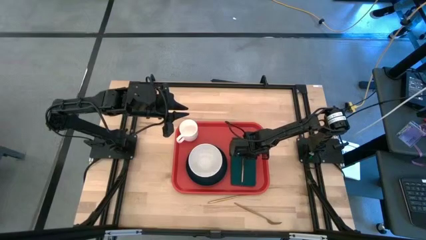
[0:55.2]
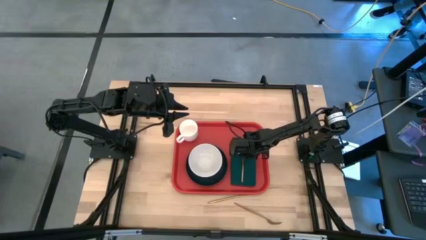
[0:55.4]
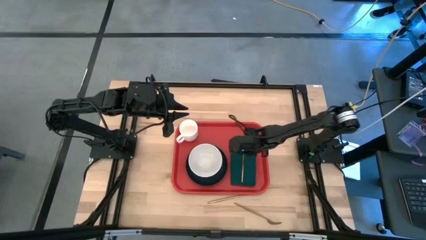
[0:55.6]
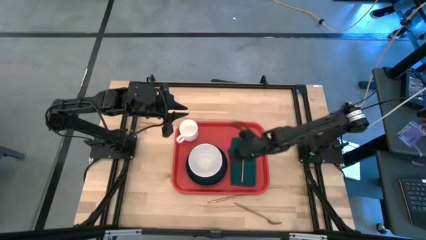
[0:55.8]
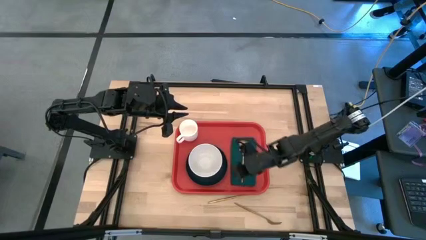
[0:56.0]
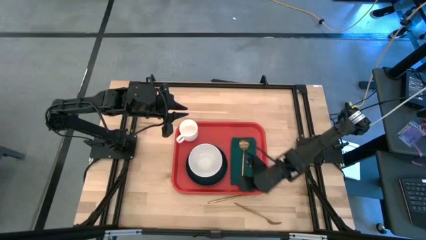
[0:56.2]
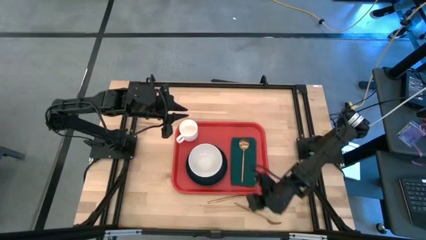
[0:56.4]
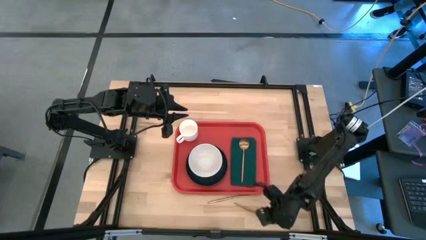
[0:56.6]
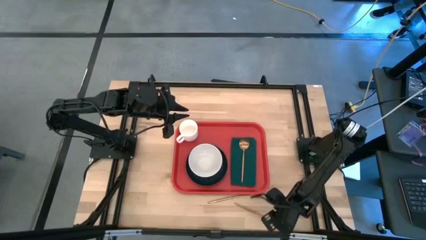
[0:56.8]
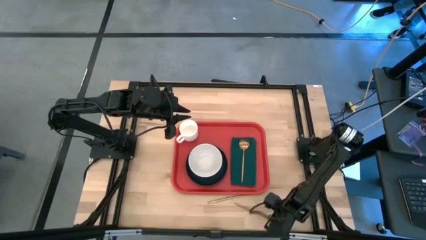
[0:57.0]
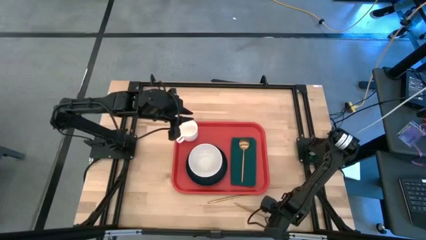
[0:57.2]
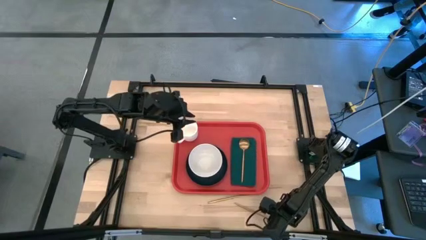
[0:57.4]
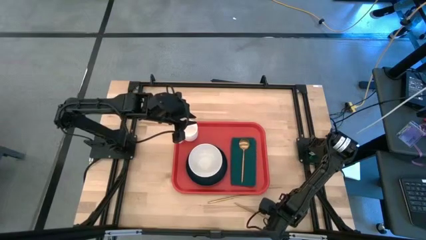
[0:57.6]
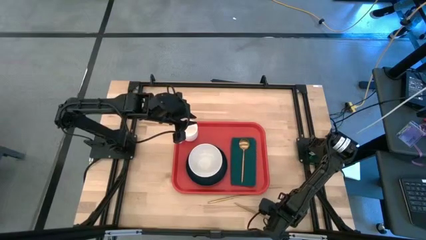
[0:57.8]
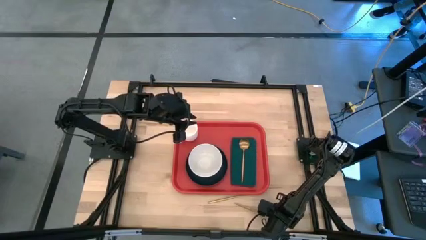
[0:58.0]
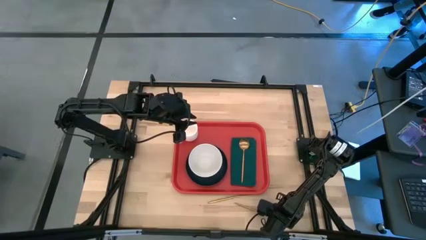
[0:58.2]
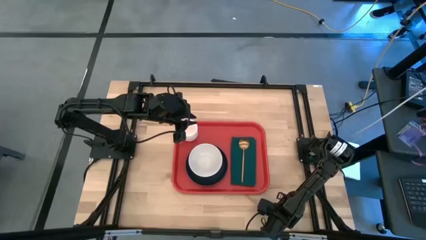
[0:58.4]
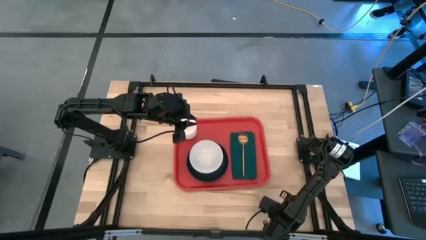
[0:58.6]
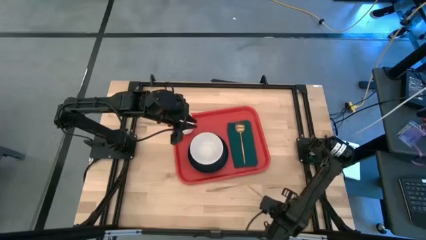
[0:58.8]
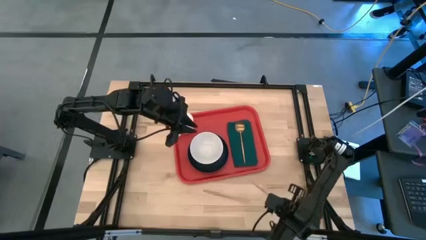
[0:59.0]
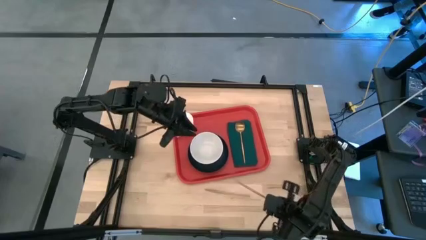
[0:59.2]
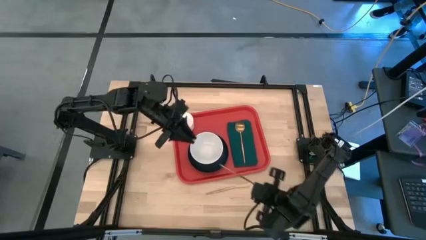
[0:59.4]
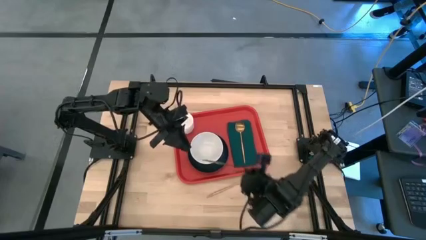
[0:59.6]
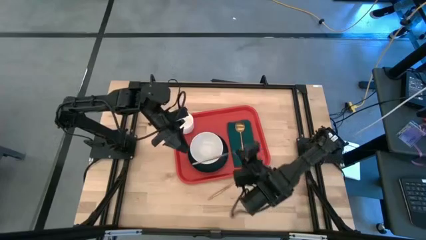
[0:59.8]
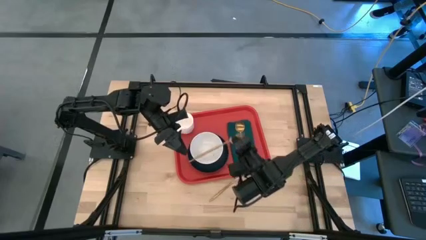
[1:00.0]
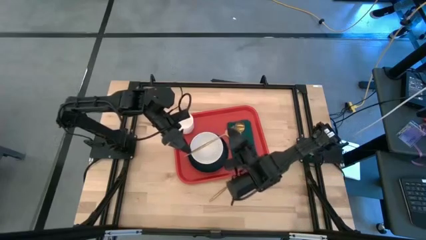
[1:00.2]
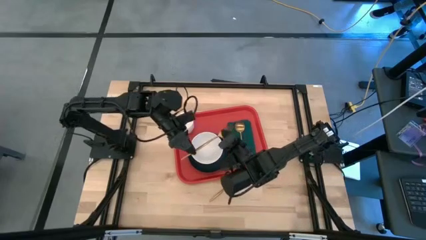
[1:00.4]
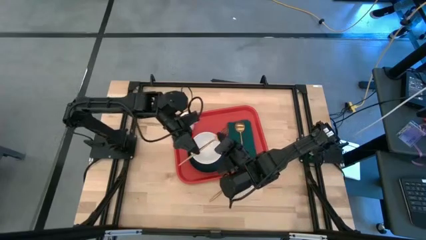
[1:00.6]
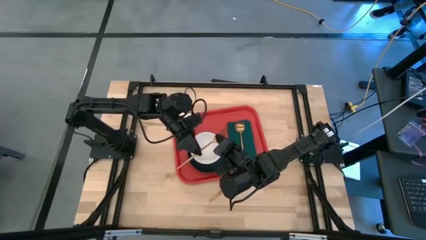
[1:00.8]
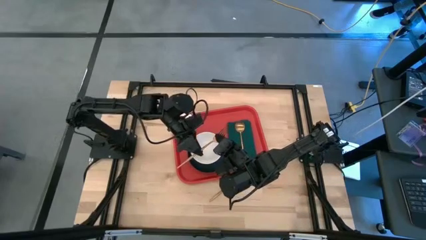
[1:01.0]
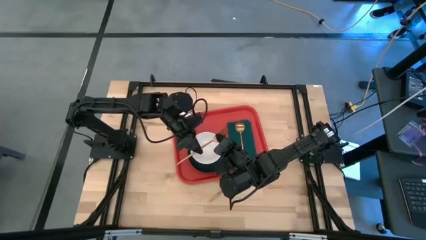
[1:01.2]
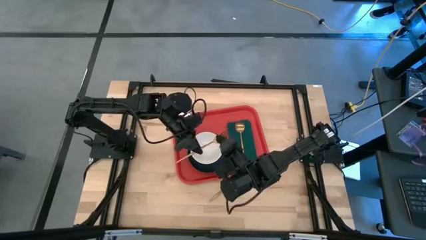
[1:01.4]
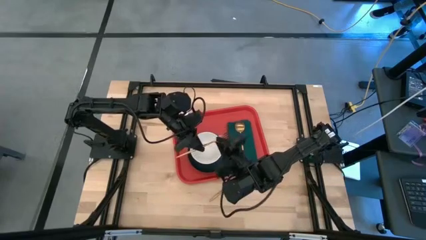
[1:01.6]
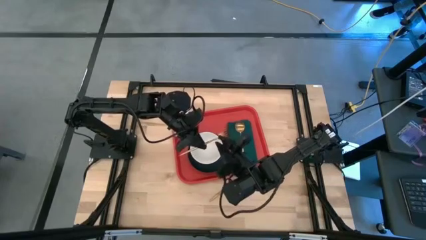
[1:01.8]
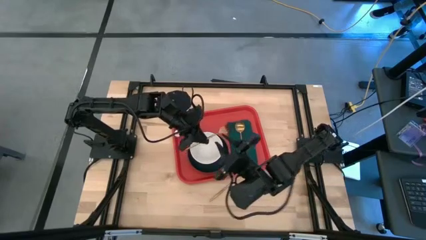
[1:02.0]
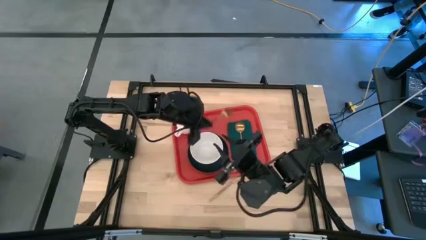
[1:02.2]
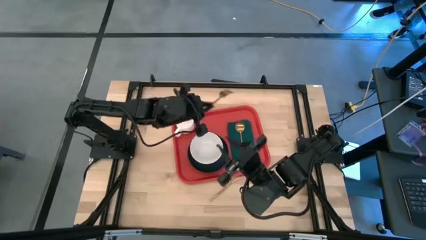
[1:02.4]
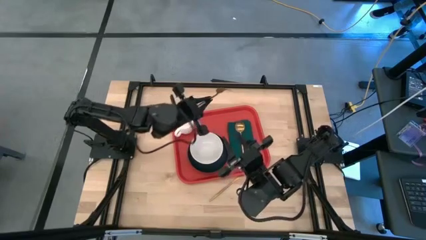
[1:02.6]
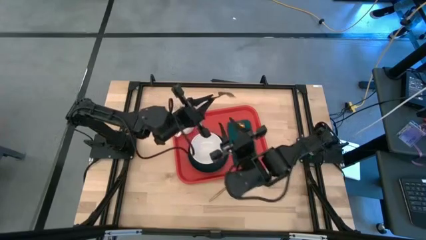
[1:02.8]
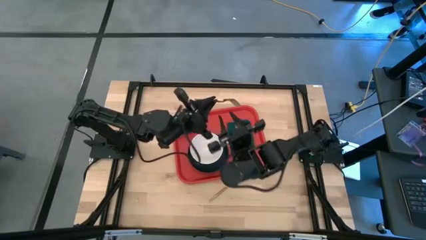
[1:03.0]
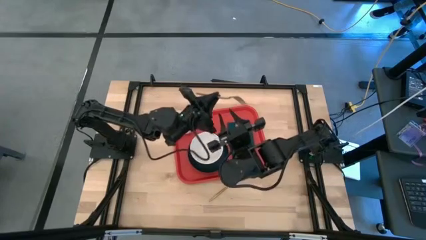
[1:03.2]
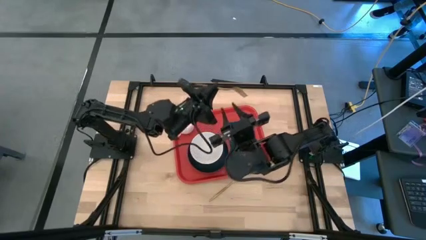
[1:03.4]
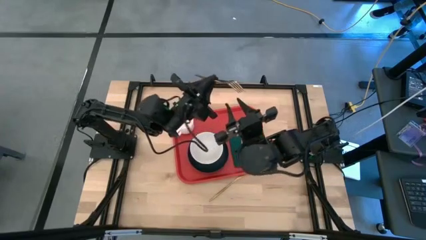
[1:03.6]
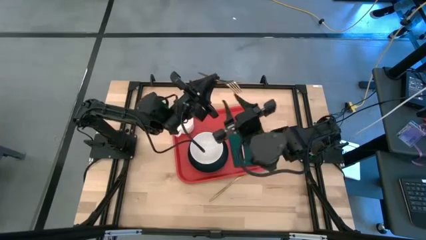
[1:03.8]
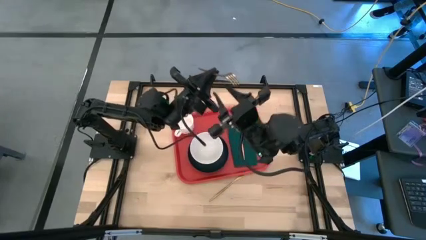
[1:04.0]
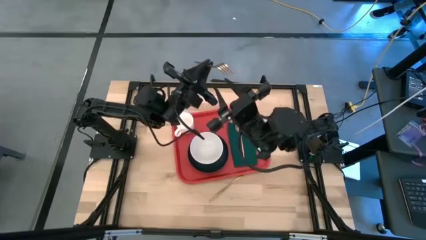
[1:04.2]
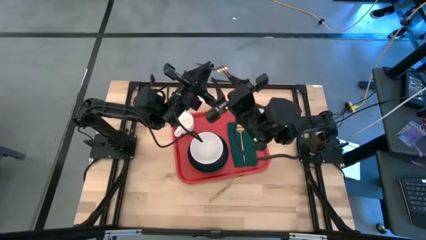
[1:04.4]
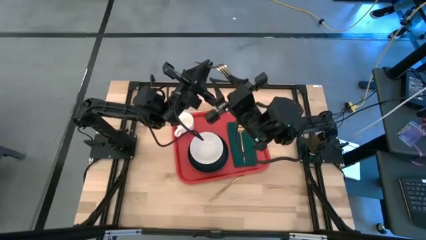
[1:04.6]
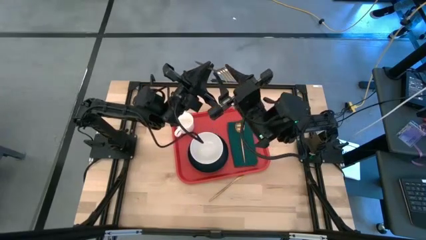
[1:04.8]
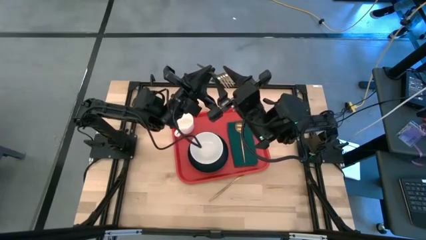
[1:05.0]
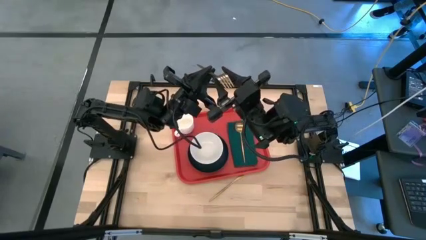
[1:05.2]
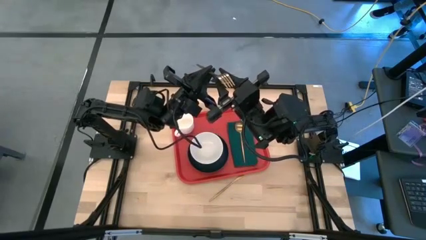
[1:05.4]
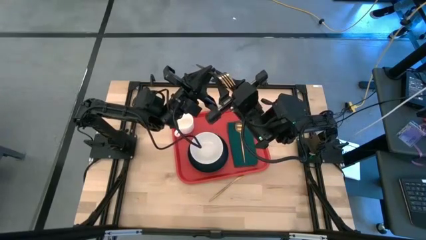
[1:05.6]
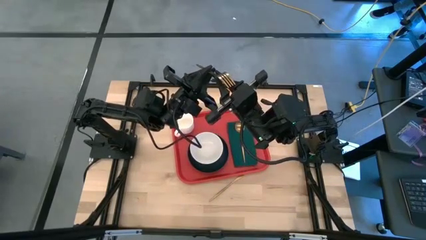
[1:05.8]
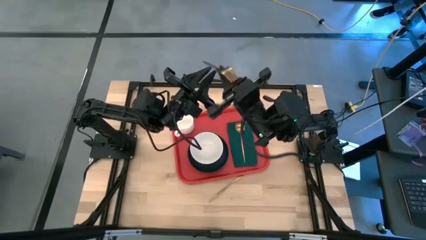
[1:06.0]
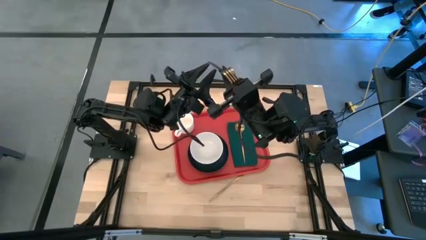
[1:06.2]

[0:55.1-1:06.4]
Task: Set up tray
Put the gold fork to the right of the gold spoon on the green napkin on the red tray

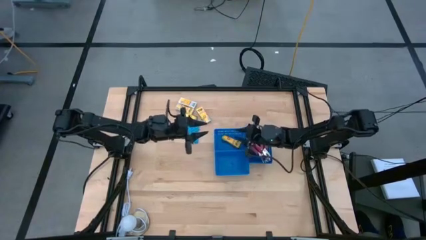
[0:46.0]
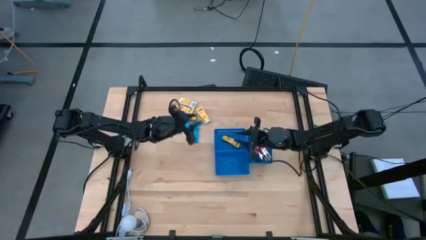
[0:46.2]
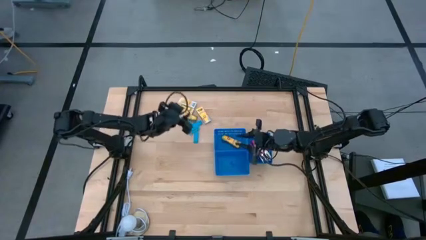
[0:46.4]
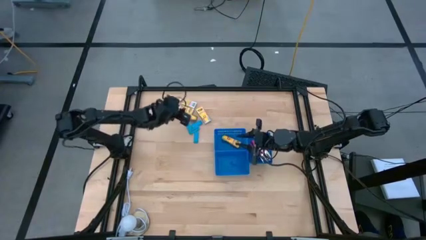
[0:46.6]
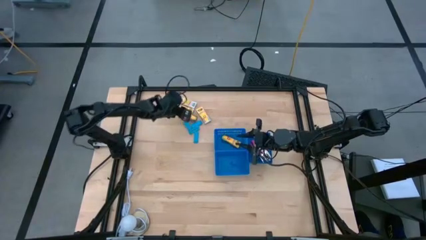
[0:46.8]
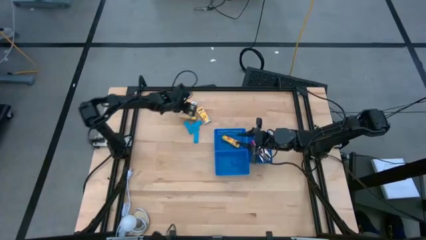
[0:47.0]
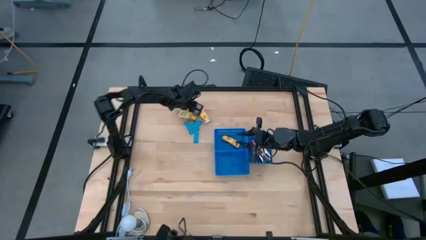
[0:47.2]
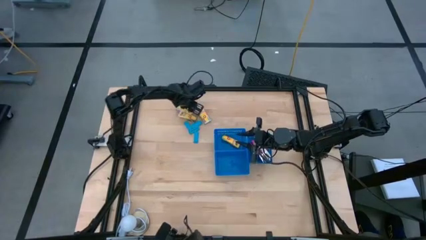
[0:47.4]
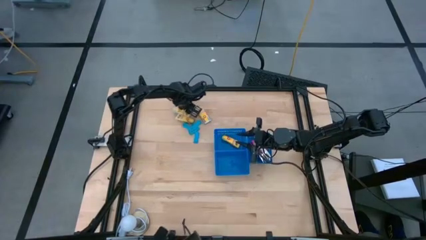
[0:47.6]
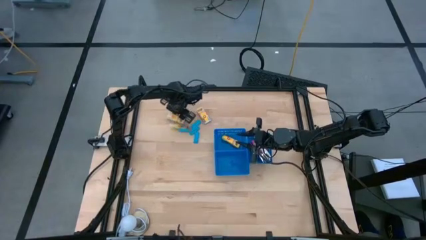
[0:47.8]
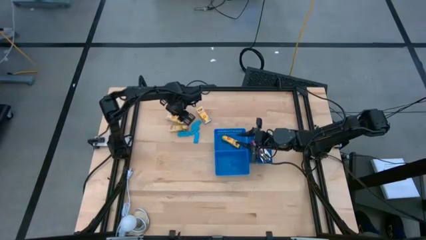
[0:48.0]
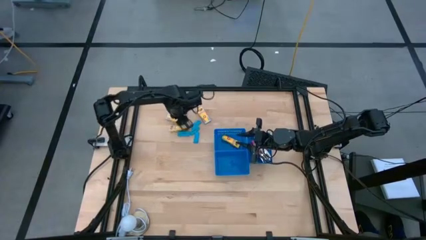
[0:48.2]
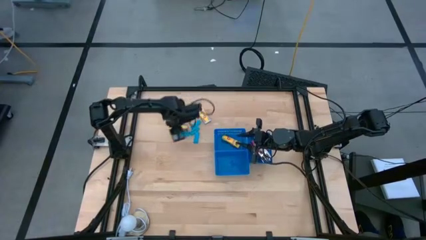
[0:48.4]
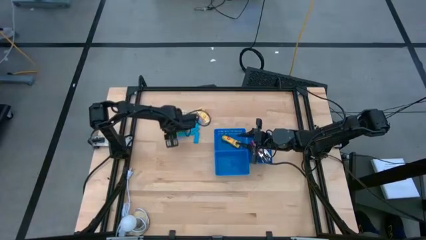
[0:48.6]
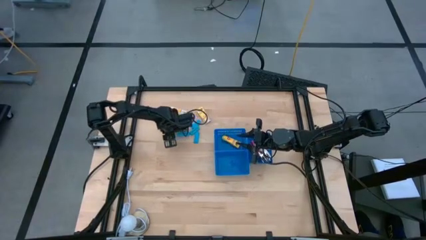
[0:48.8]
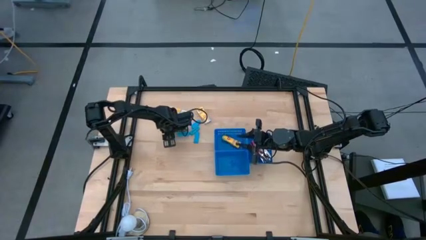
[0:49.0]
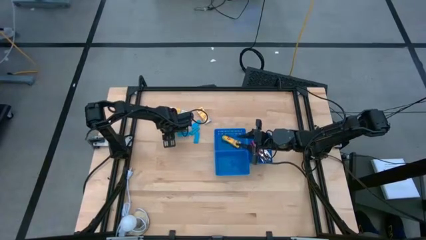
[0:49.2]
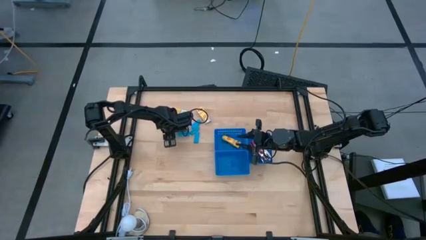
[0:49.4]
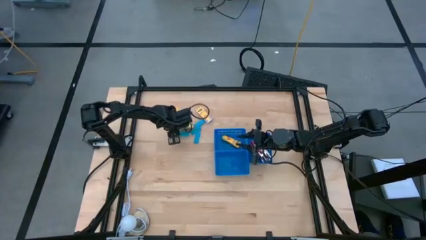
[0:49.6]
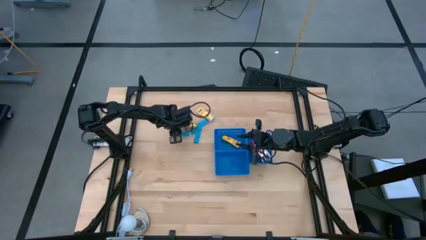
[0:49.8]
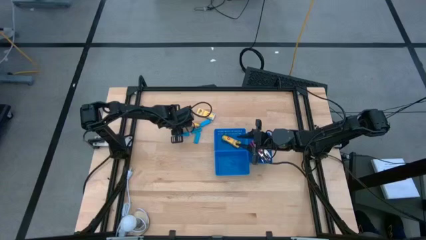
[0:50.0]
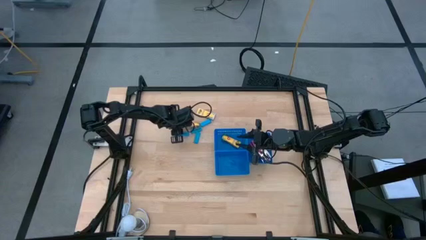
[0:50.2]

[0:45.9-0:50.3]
Task: Pick & Place School Supplies
Put the crayon box into the top horizontal blue bin

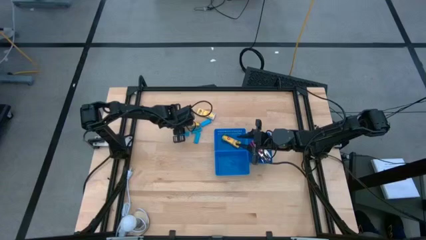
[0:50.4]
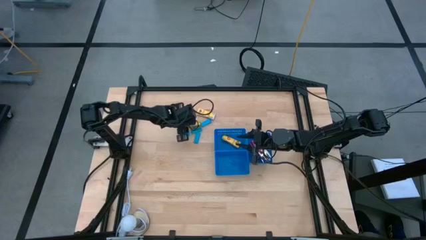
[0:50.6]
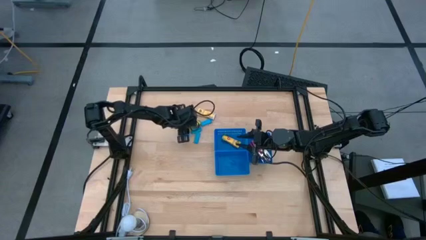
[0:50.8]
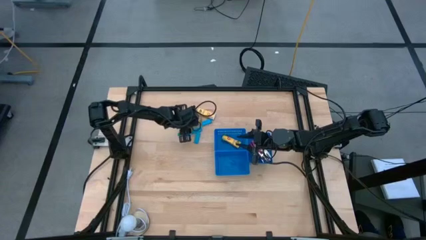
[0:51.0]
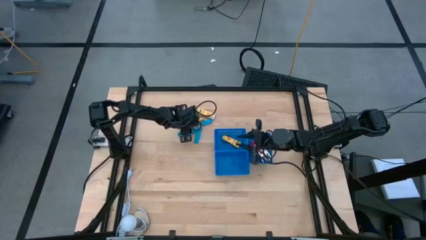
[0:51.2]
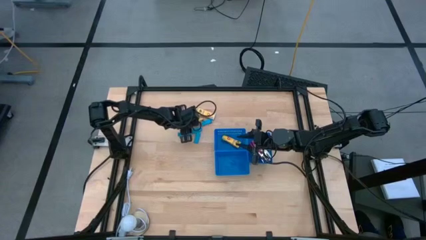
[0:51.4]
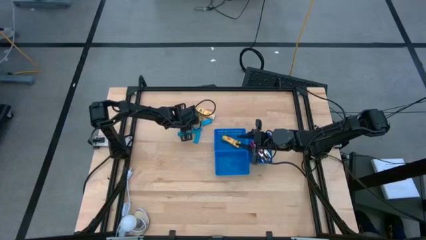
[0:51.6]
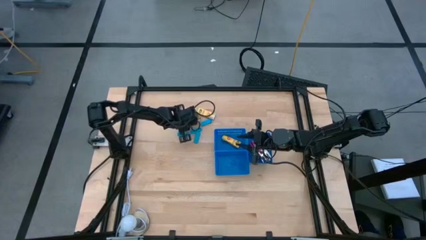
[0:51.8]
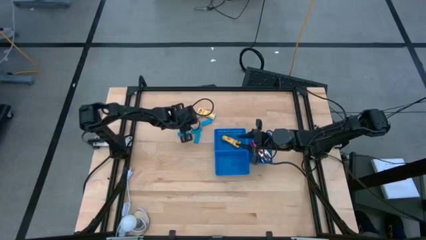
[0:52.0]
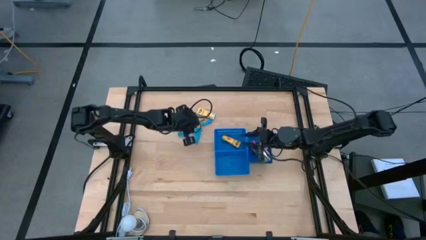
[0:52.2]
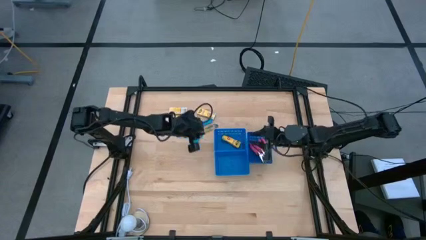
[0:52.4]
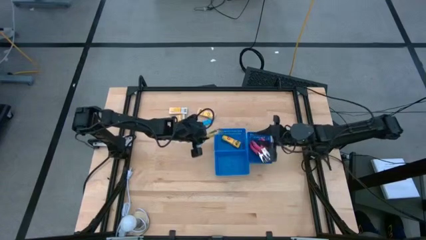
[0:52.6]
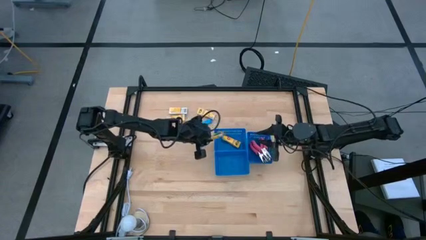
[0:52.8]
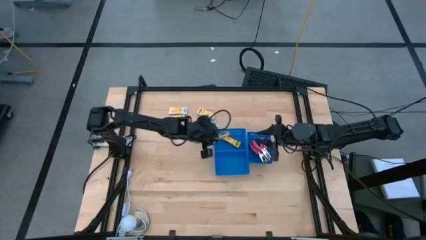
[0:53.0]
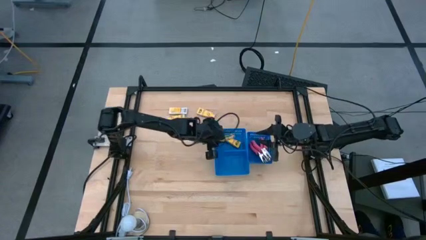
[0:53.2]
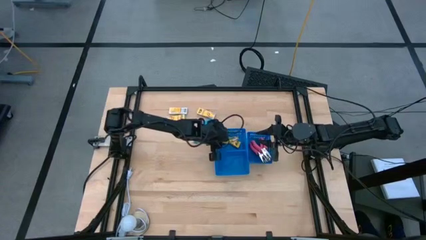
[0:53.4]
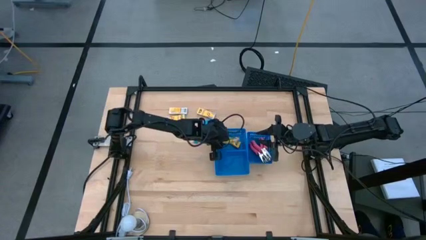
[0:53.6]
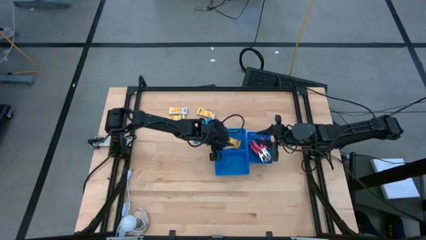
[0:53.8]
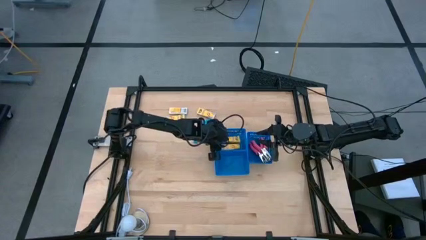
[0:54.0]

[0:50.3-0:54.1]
Put the crayon box into the top horizontal blue bin
